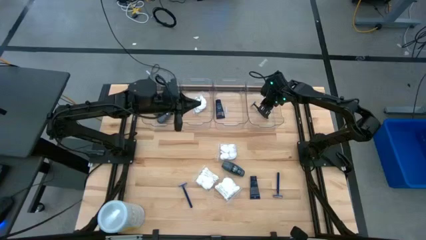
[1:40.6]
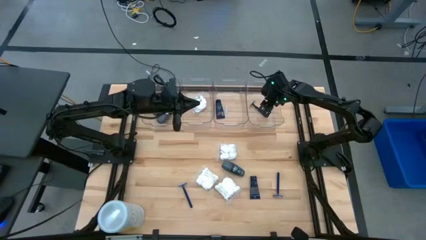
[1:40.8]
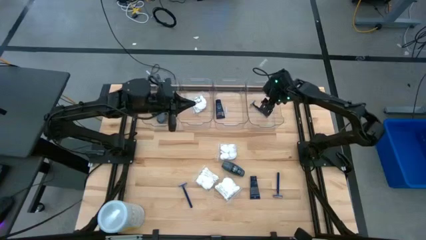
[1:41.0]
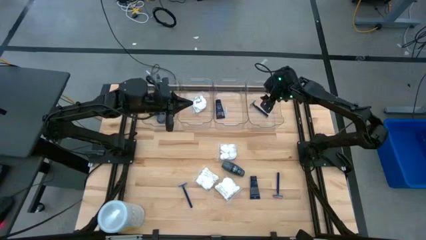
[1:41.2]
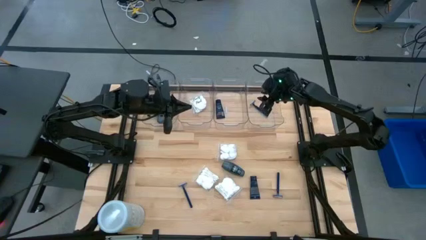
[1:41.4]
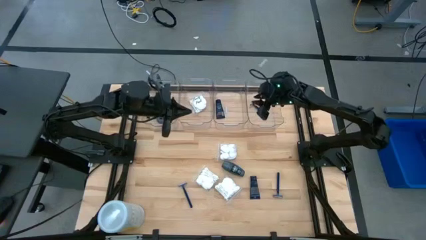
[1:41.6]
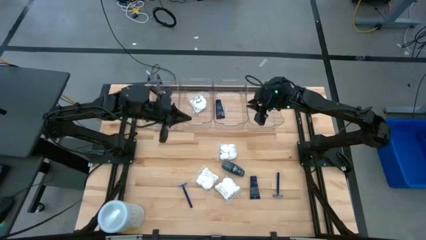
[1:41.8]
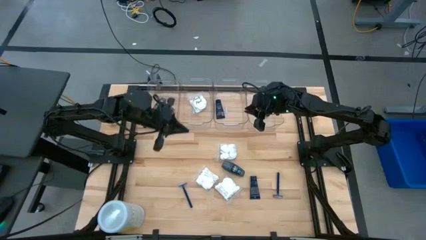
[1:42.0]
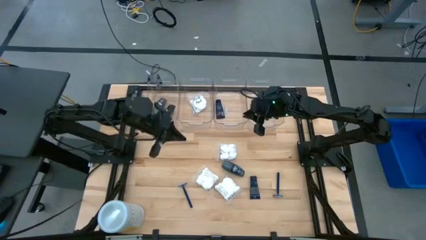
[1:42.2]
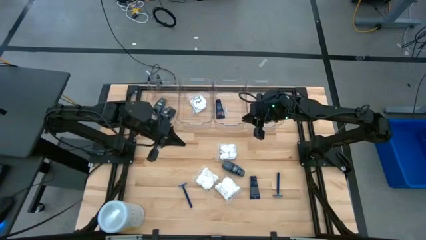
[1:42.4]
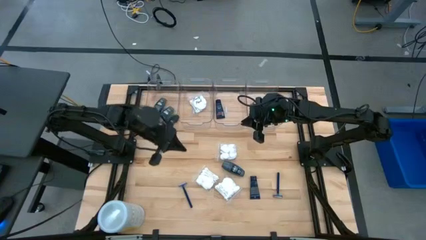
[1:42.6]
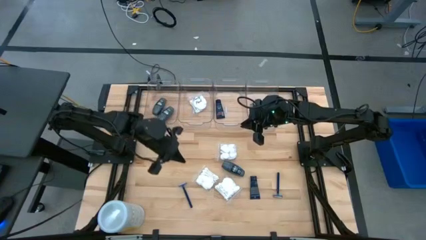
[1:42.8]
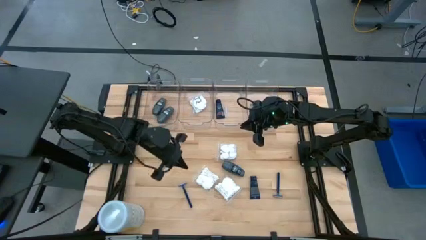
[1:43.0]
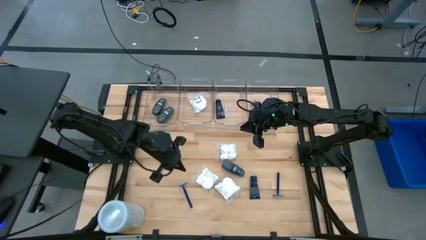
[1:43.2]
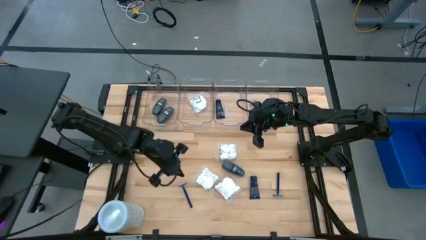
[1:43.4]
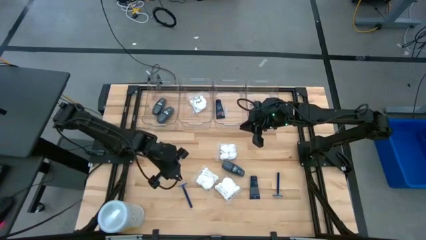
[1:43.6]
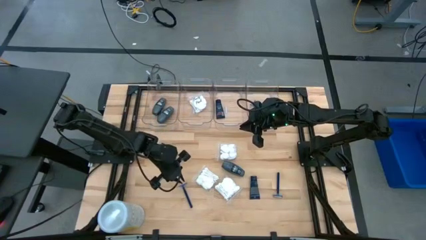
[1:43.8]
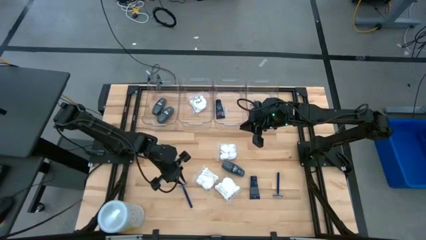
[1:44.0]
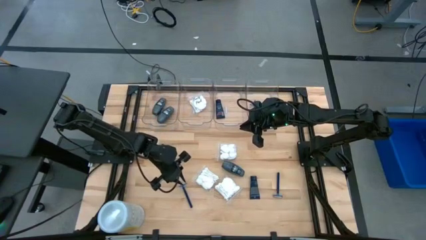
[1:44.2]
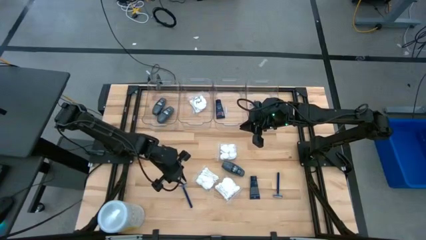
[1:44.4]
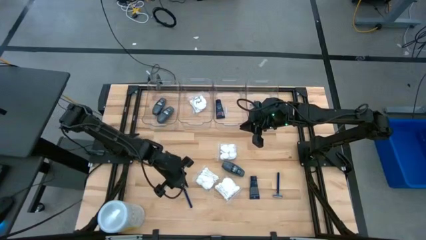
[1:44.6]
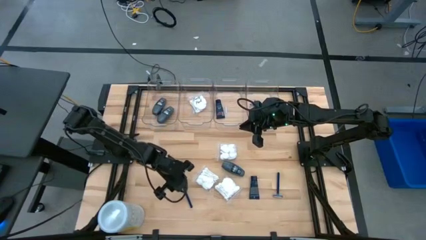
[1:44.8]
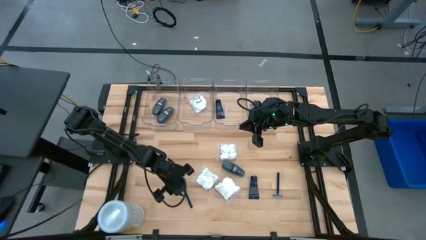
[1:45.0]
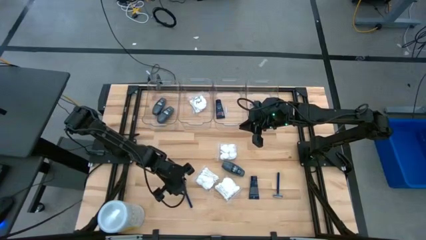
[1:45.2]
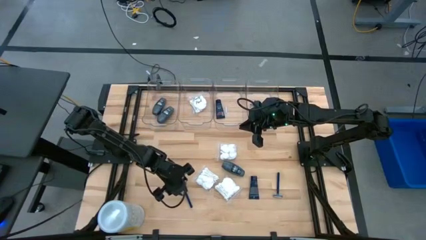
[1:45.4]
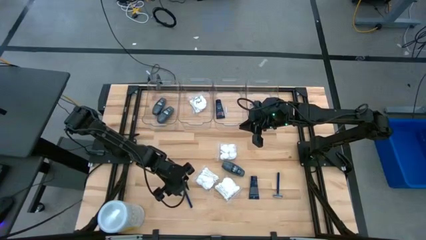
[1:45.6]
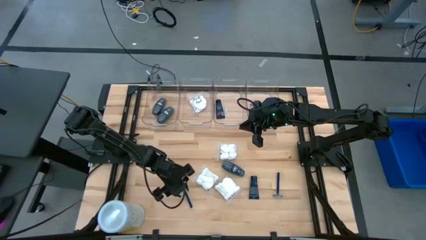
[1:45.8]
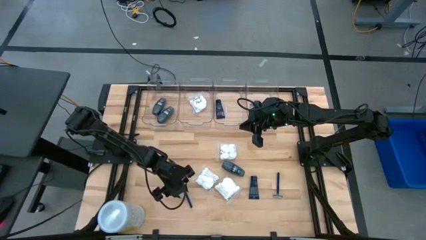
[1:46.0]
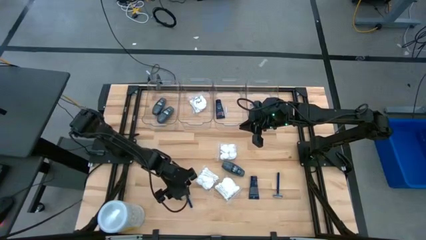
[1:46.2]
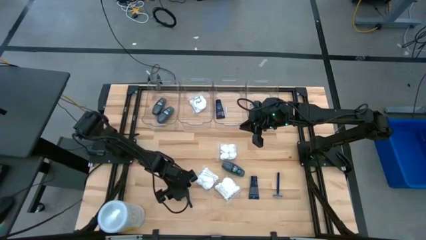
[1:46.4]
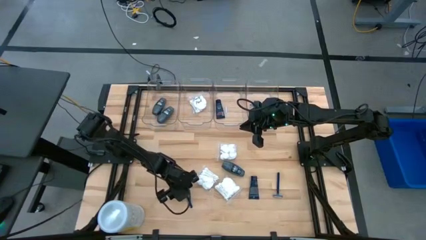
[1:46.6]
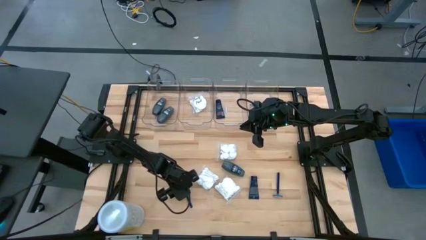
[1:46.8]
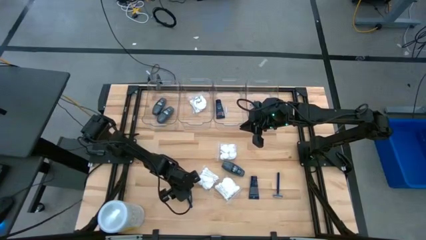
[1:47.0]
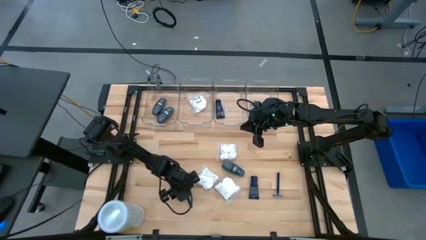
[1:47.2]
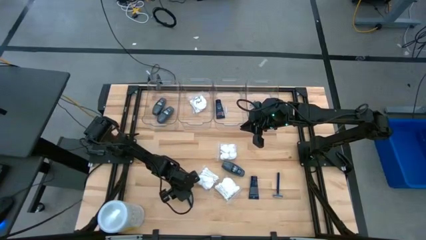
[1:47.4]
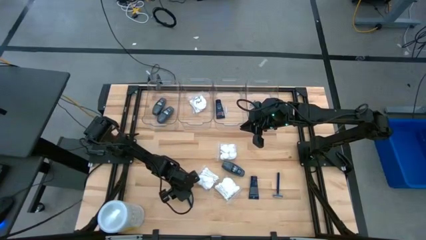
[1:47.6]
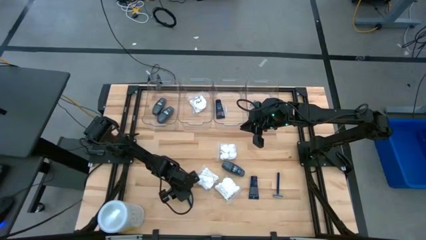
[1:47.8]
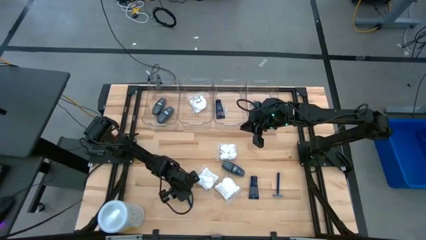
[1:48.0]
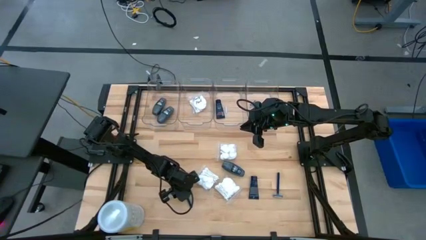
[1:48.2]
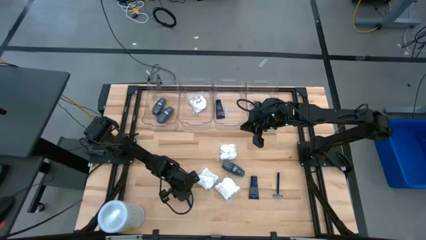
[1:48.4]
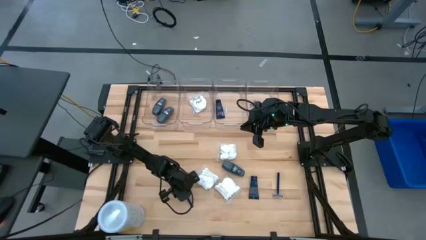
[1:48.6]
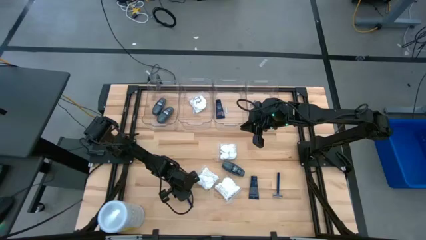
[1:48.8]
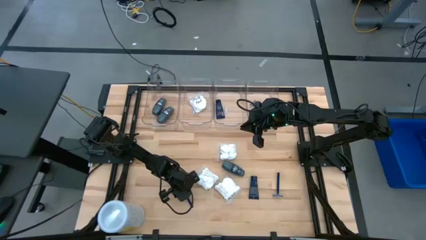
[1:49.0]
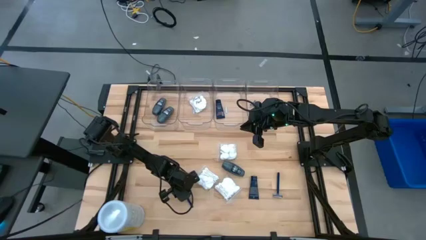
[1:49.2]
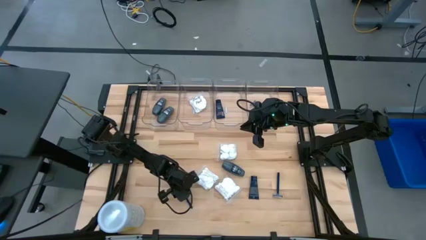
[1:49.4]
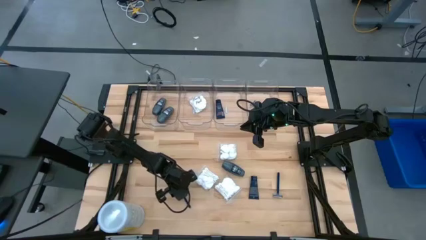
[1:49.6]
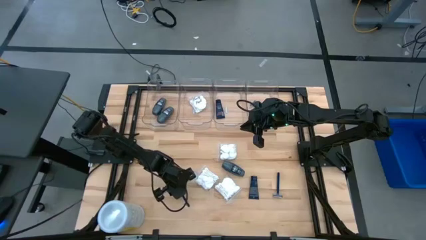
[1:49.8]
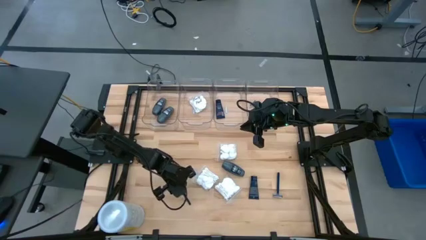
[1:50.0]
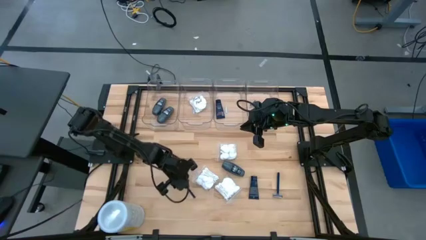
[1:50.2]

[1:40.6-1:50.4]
Task: Pick & Place Travel size toiletries
Put the left blue razor into the right transparent bin

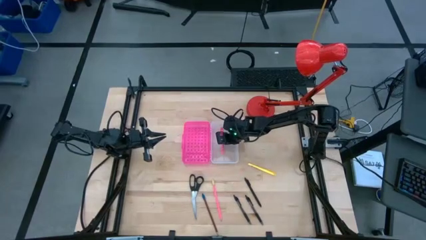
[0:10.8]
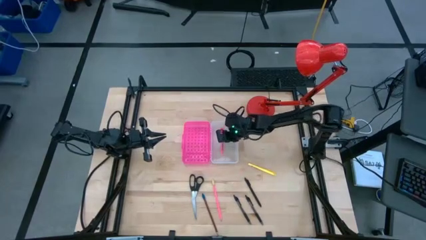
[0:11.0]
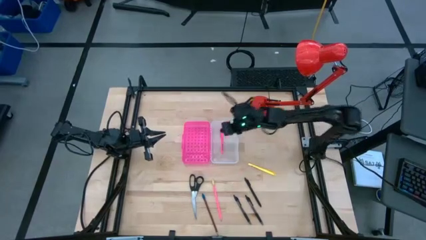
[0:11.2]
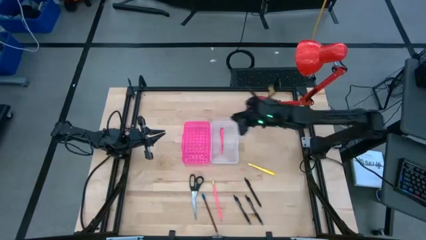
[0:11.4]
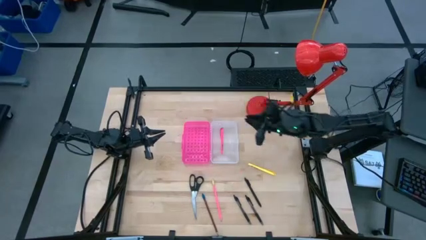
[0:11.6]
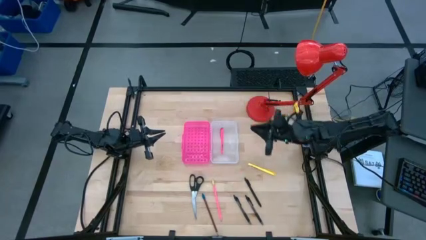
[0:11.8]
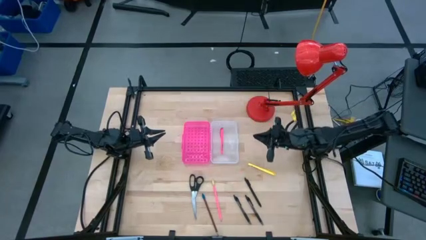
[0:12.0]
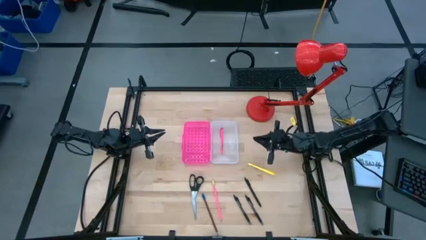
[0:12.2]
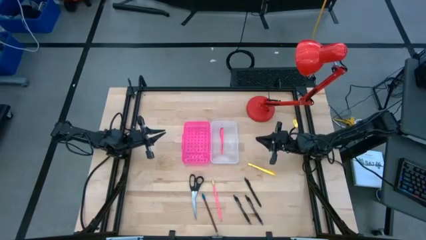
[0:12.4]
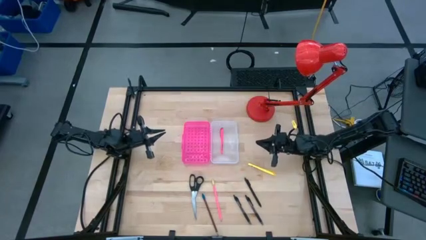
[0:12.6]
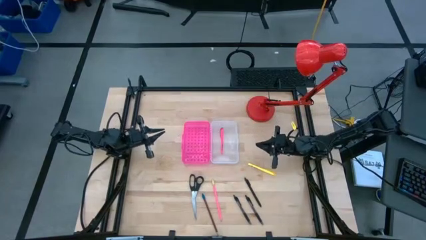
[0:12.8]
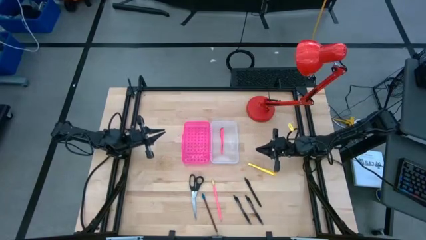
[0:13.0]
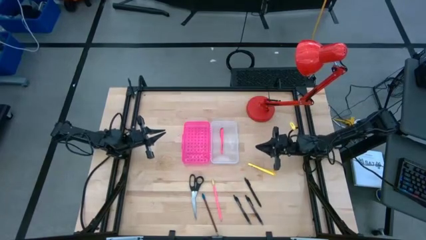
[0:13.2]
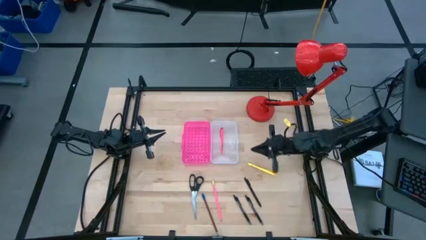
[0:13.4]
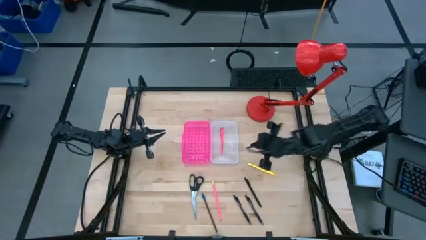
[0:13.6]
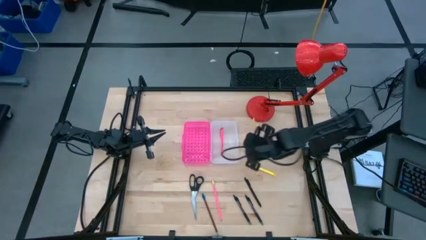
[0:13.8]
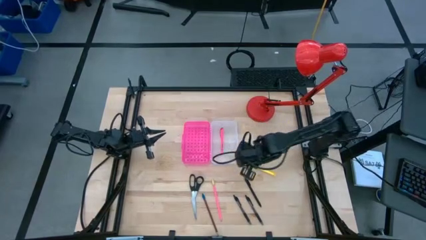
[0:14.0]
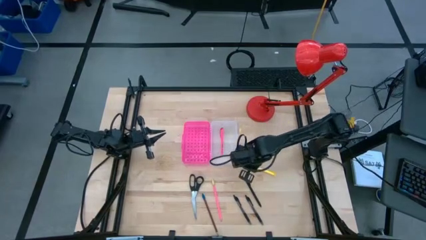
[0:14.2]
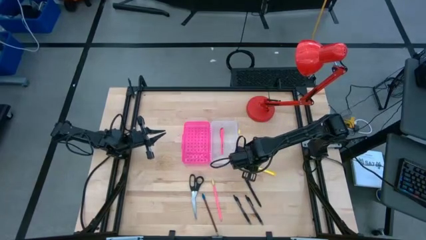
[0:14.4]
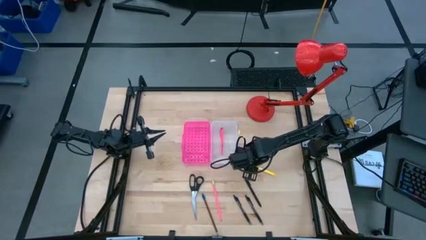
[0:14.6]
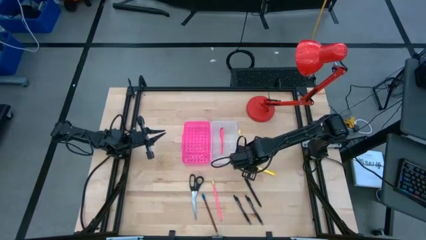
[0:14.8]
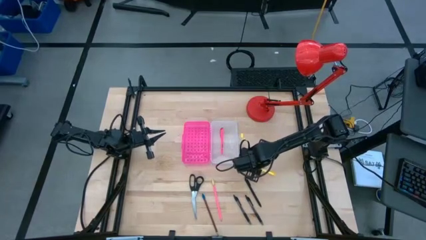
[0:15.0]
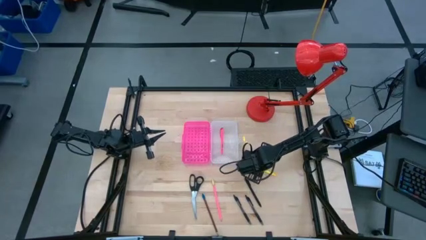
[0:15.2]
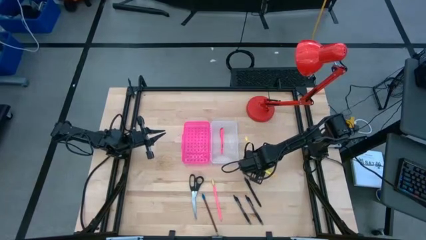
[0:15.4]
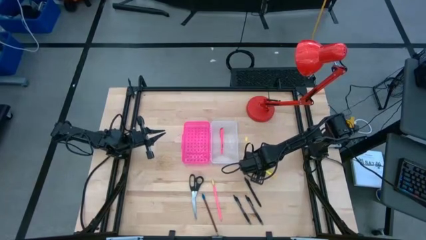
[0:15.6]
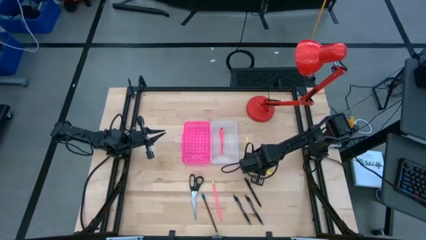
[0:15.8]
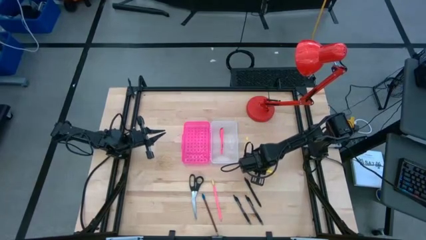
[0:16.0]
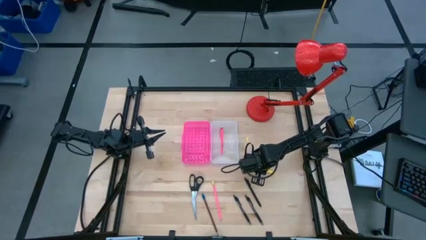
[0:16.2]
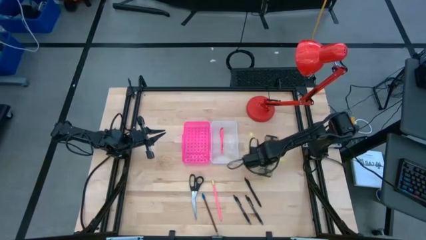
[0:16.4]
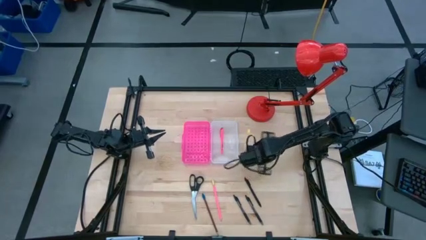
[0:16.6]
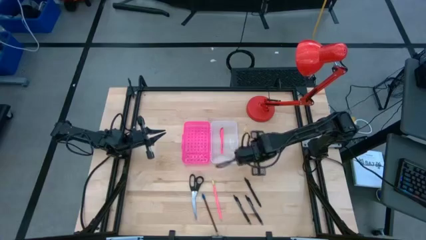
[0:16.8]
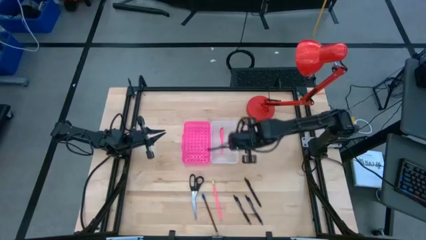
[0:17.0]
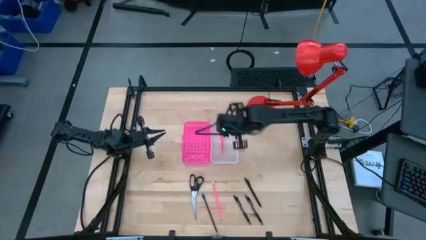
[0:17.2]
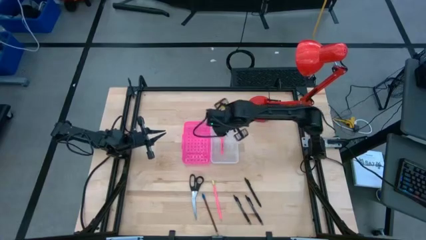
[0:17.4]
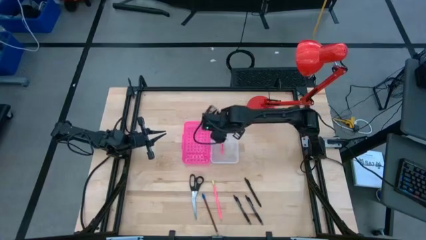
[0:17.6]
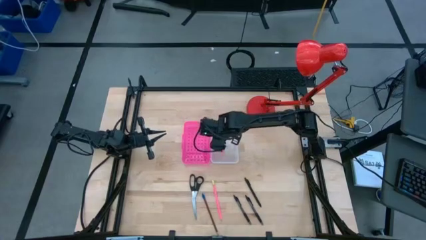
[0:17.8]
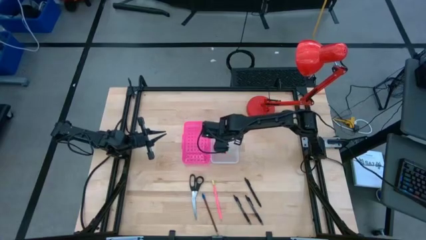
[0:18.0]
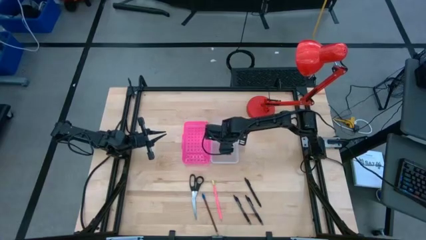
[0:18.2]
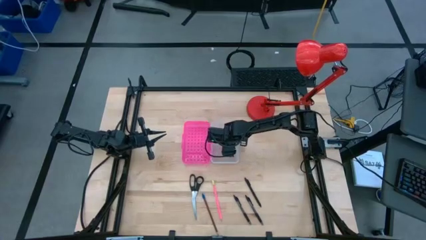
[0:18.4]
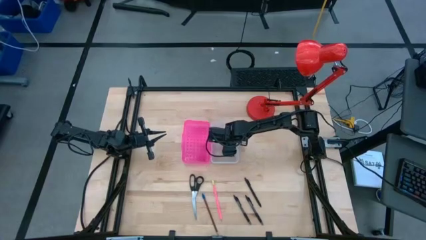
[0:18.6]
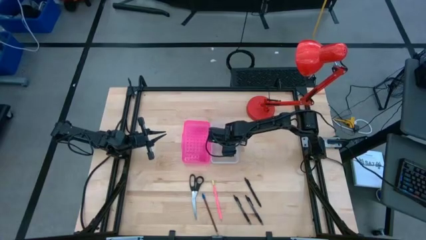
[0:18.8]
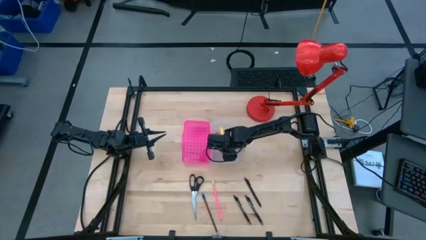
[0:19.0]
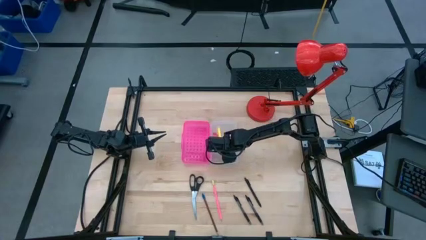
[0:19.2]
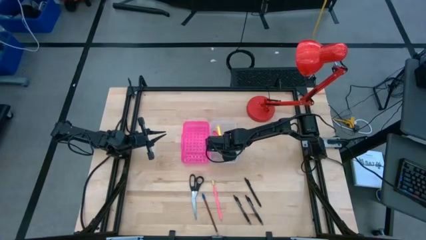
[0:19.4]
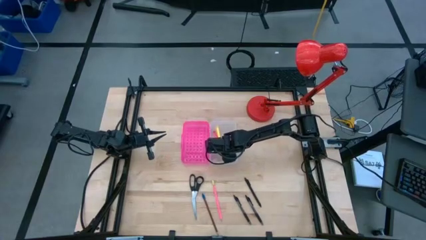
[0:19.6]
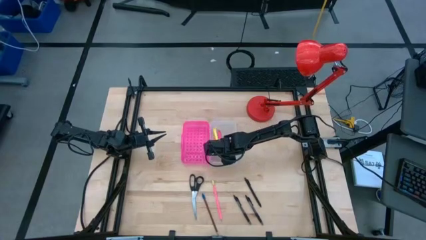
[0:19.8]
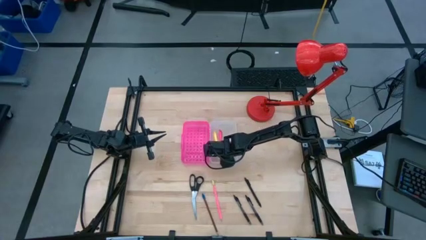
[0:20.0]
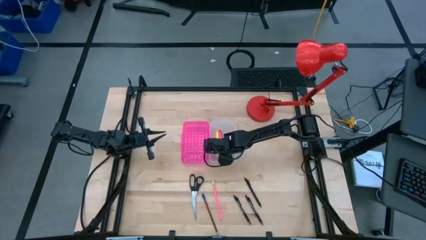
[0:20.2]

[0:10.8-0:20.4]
Task: Pick & place school supplies into a supply box
Put the yellow pen into the supply box
